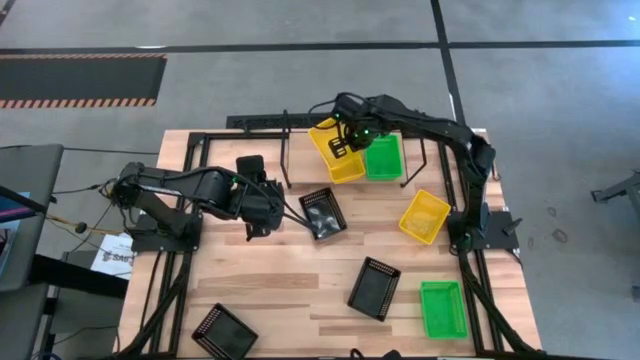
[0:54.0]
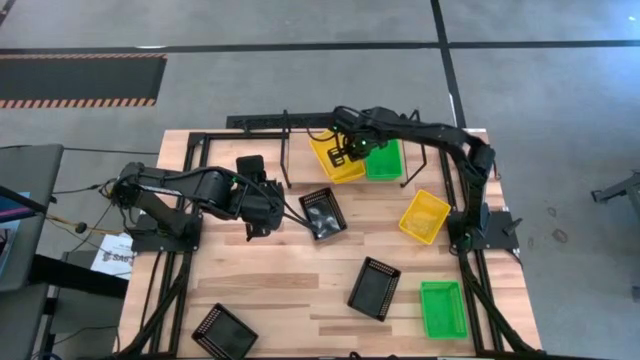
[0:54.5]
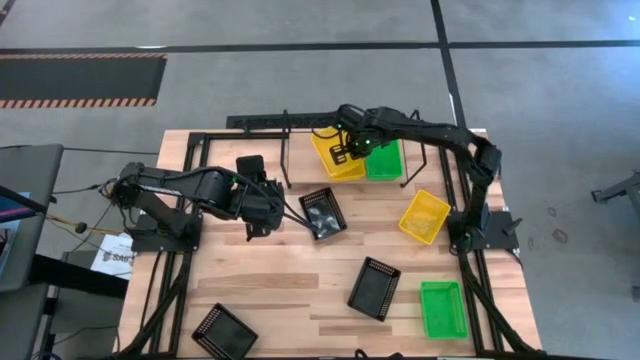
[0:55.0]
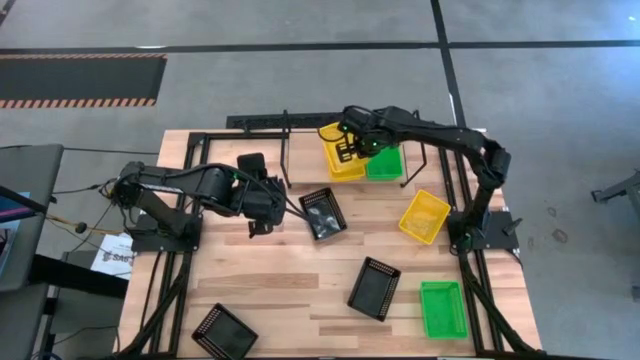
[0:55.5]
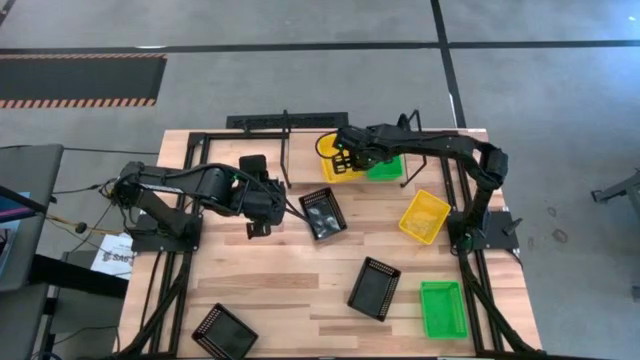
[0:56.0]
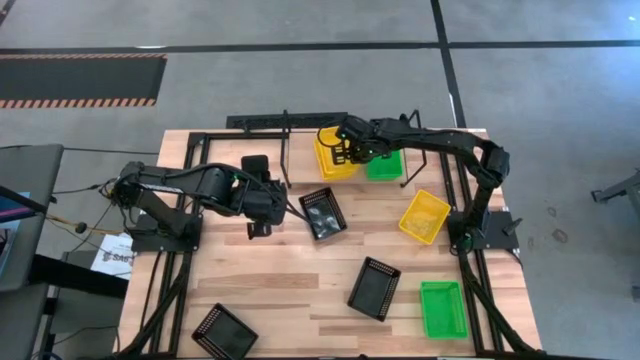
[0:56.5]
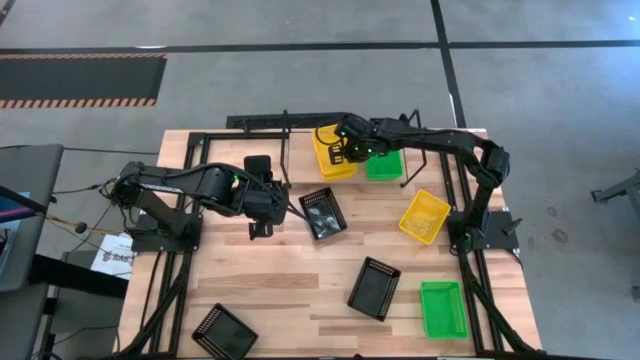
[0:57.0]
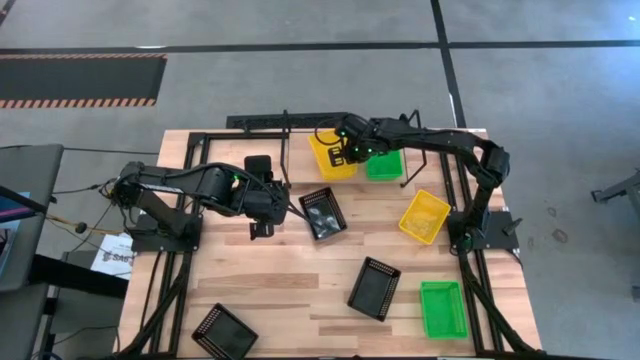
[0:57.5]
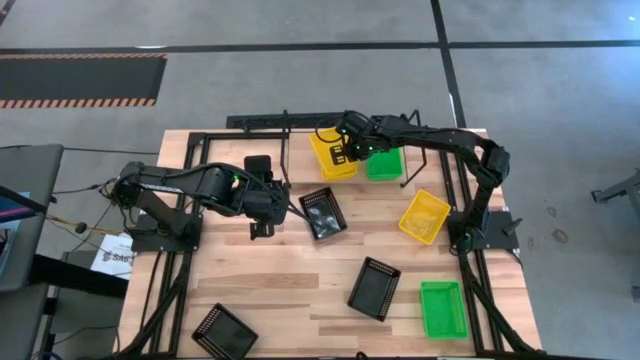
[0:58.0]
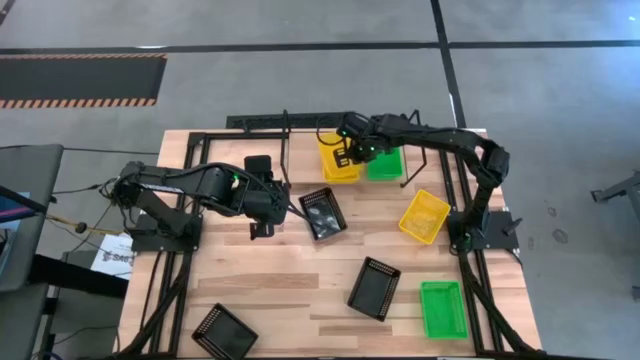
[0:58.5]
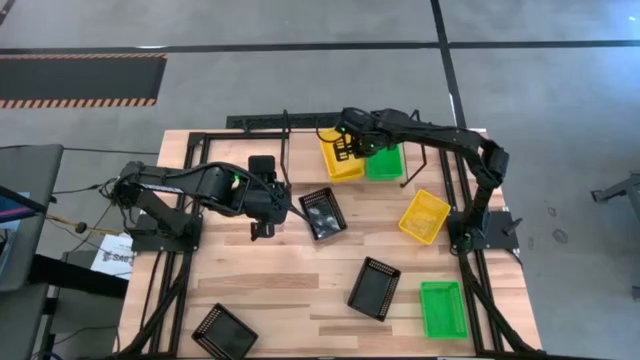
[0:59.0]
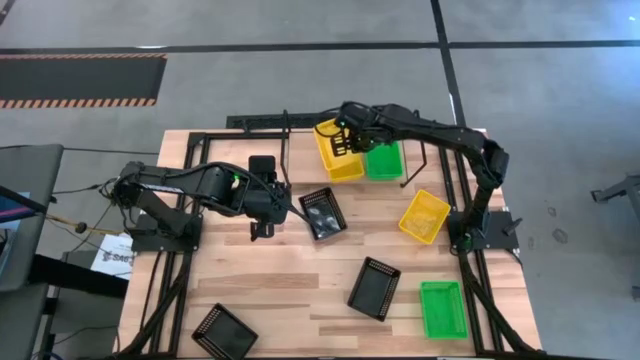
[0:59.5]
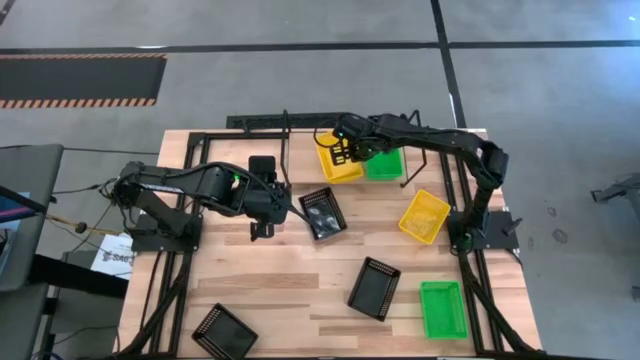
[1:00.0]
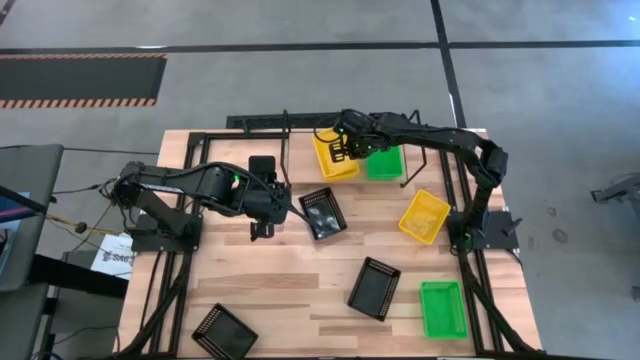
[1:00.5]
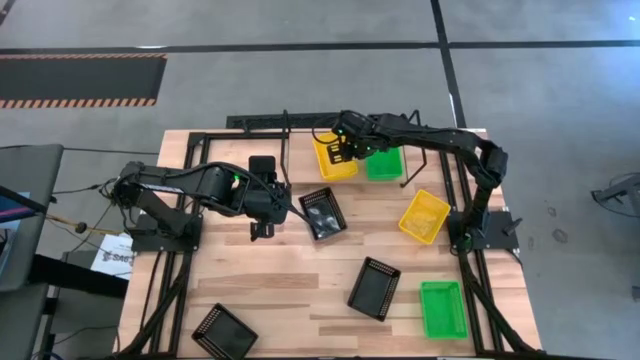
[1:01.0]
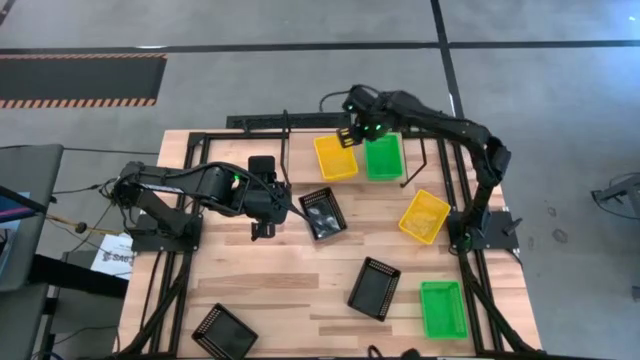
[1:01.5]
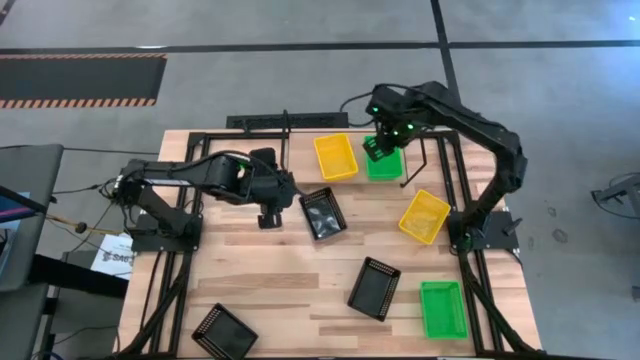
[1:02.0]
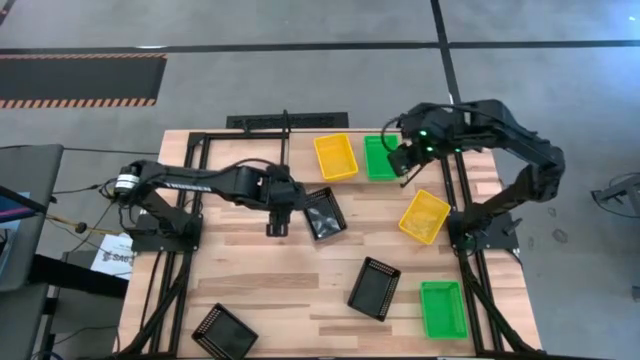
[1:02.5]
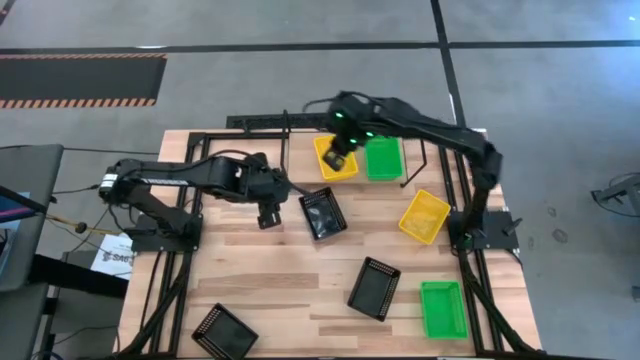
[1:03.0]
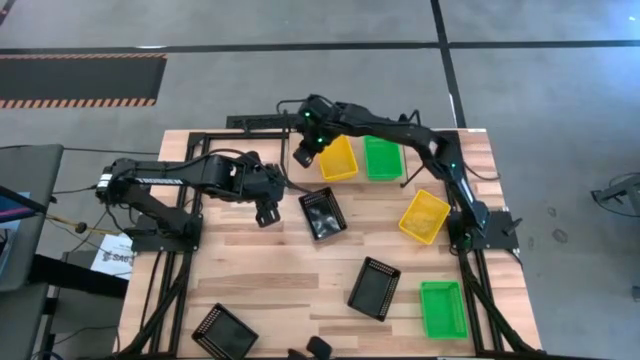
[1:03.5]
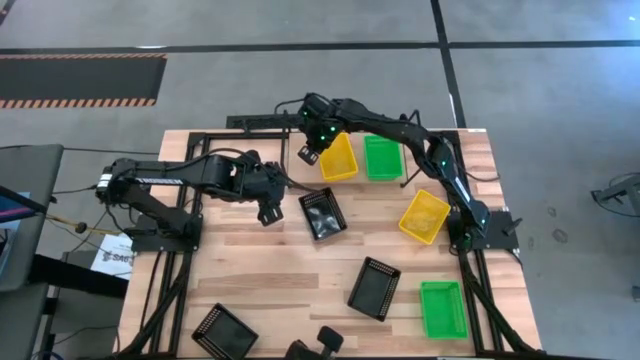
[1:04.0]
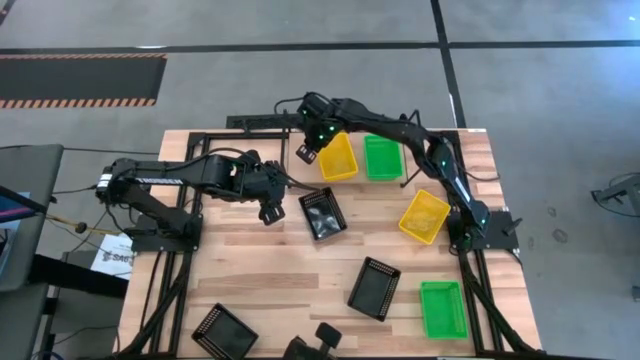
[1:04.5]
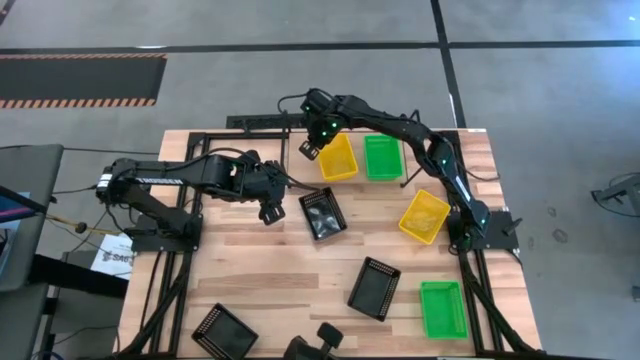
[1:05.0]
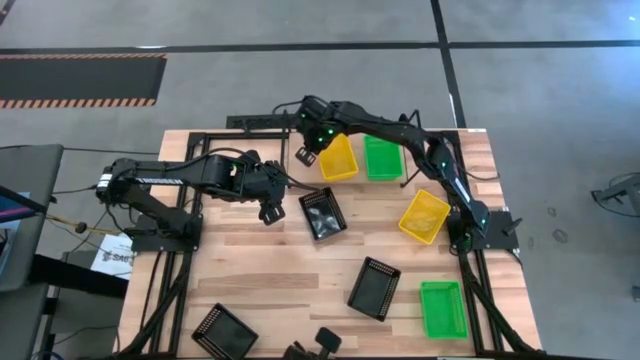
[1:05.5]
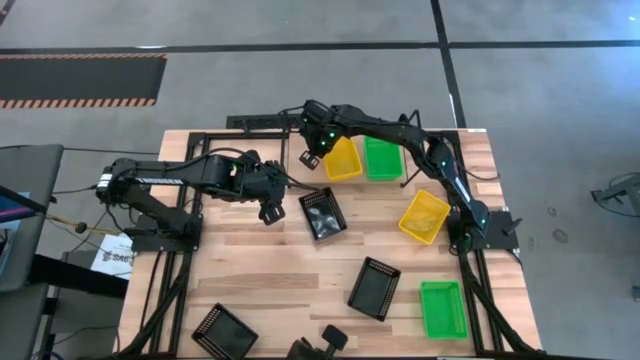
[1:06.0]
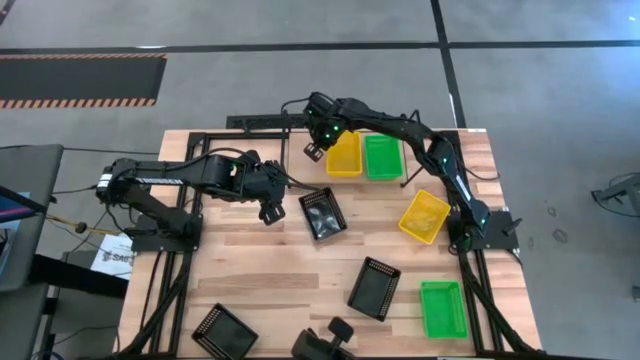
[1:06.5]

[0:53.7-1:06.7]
Task: Stack baskets on shelf by color
Stack the left yellow bin on top of the yellow bin on the shelf

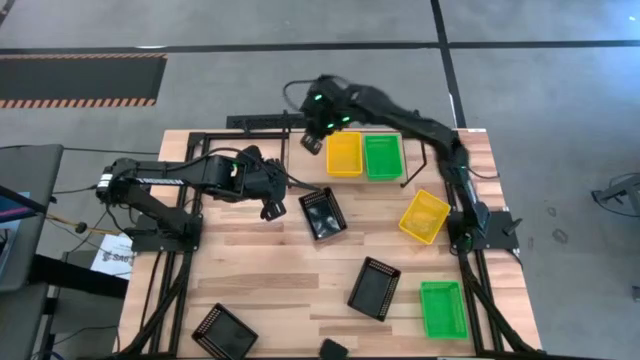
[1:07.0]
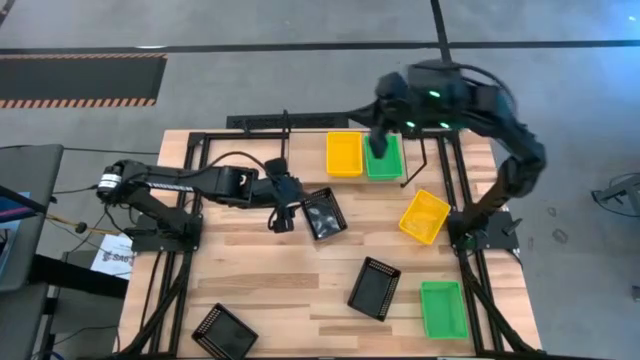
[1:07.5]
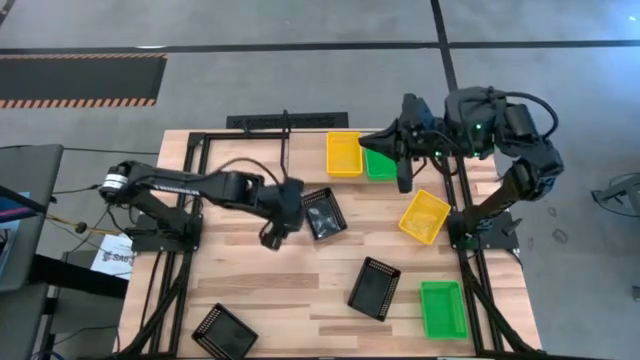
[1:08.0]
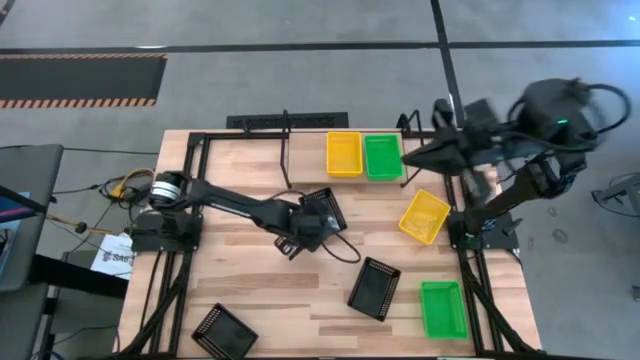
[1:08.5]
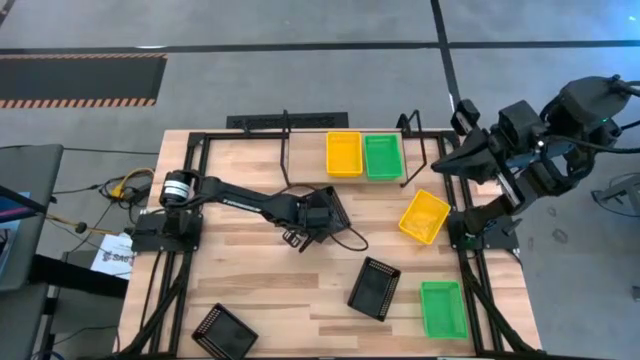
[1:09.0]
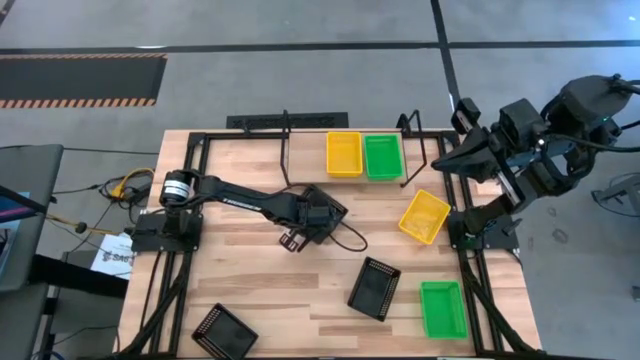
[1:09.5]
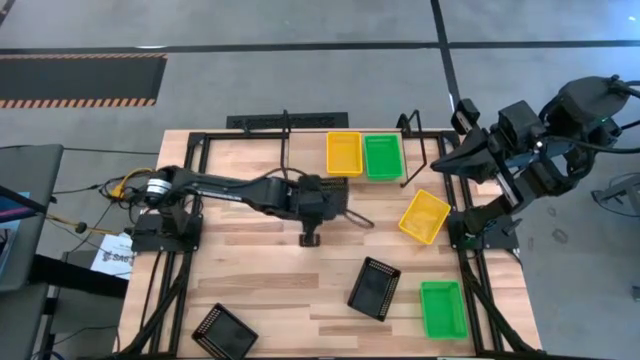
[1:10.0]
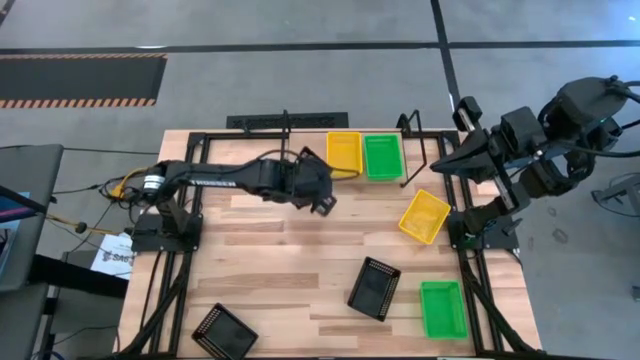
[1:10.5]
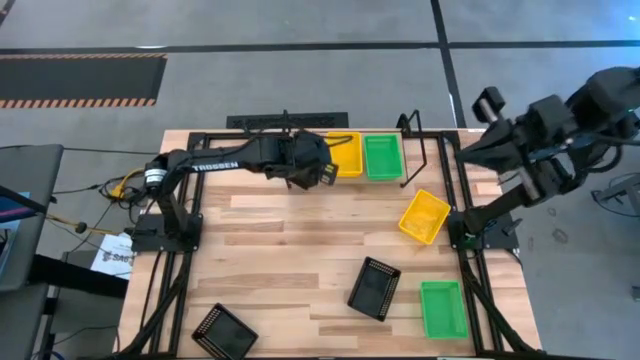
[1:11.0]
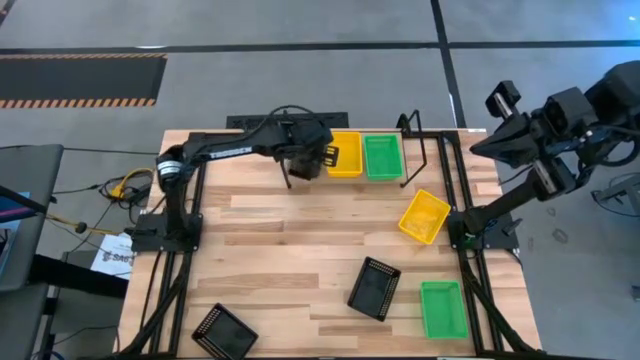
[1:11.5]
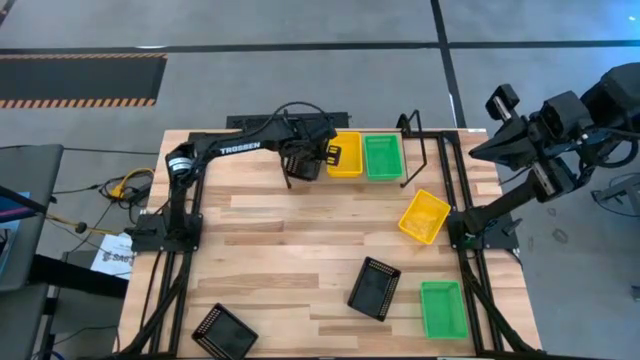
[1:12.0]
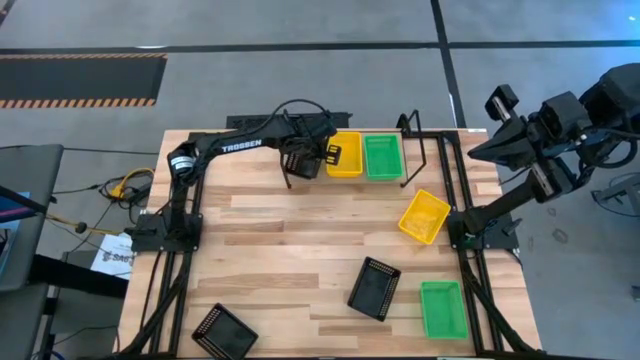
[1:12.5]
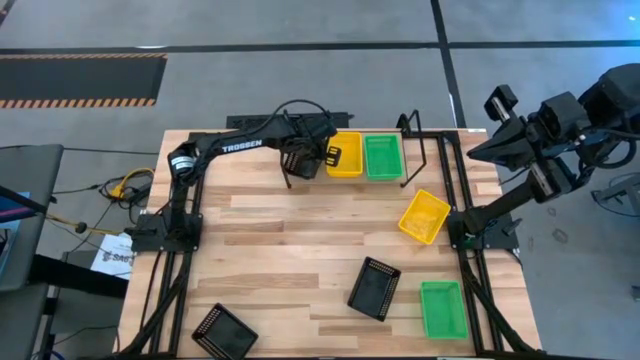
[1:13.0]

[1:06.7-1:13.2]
Put the top black bin on the shelf

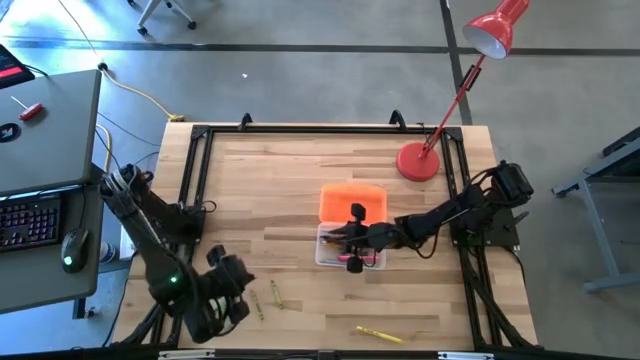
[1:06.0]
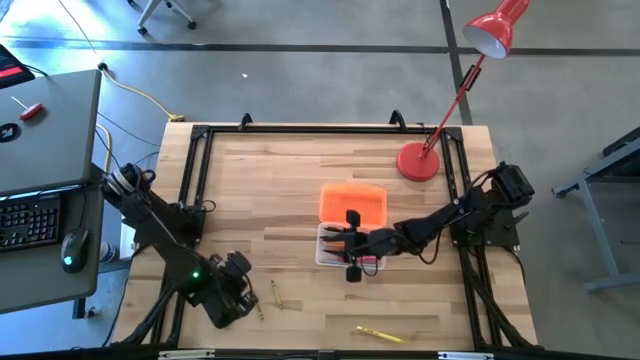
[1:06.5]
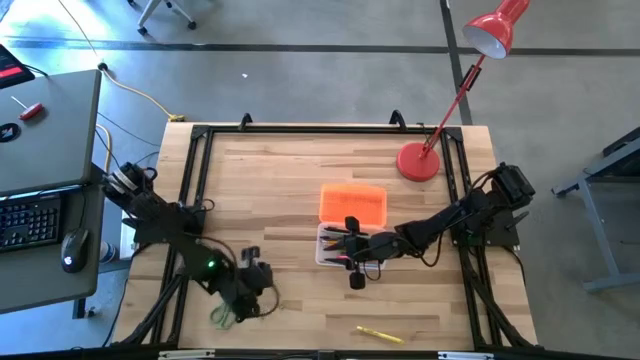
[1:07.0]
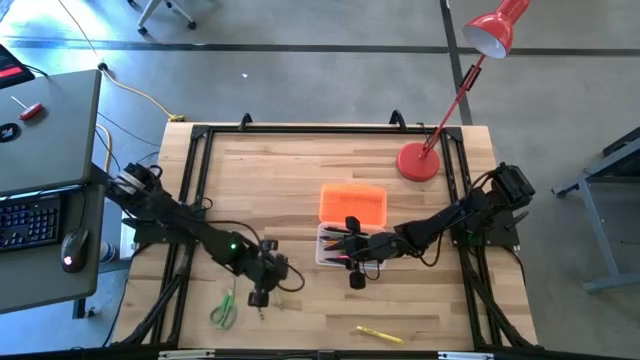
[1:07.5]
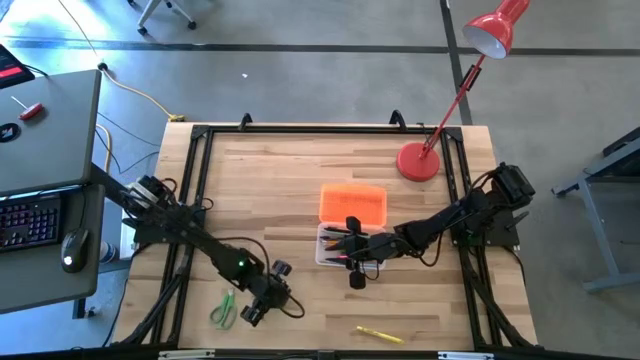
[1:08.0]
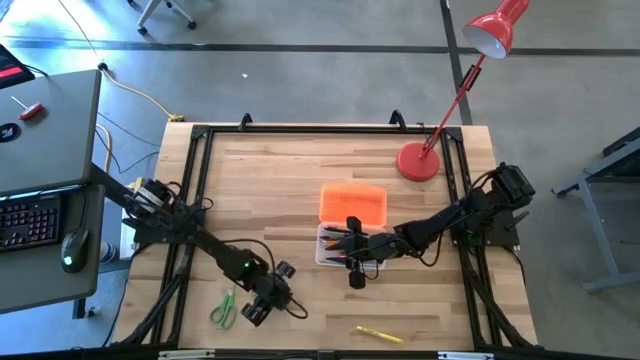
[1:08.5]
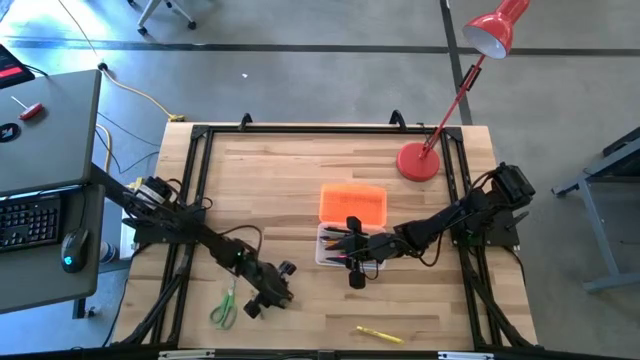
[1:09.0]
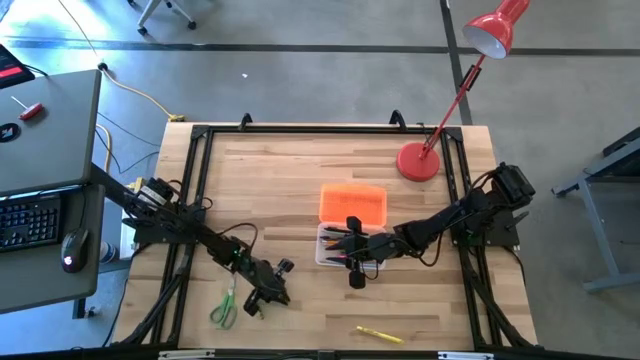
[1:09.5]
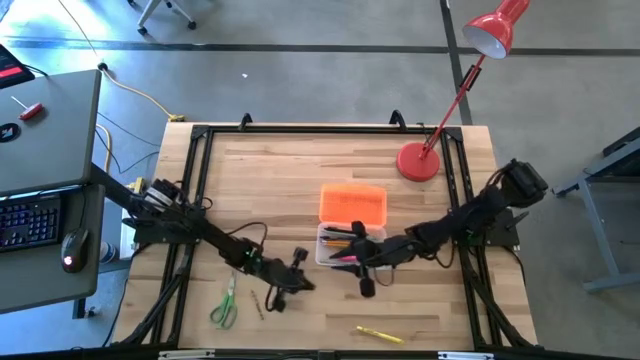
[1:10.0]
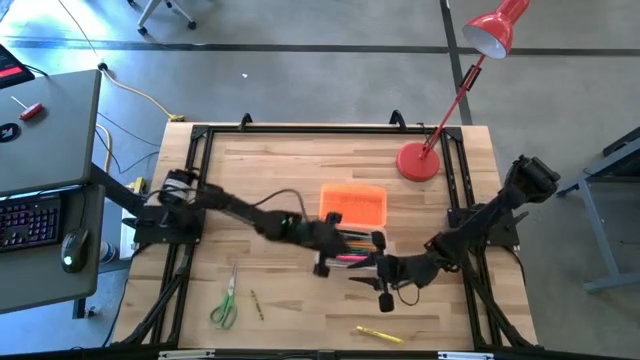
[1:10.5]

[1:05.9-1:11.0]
Task: Pick & place school supplies into a supply box
Put the right green crayon into the supply box
